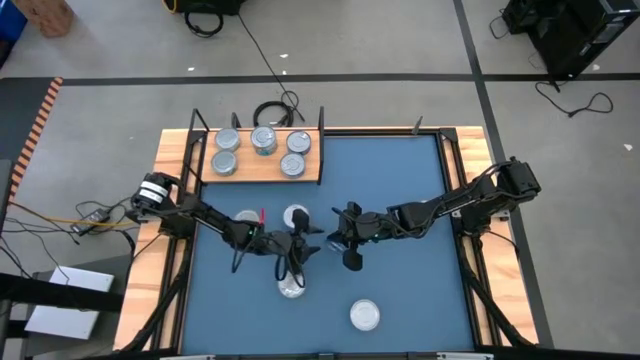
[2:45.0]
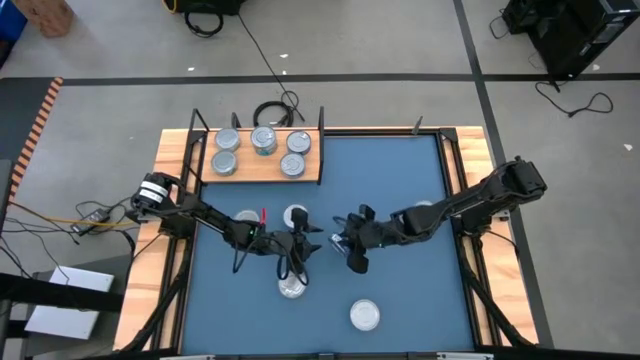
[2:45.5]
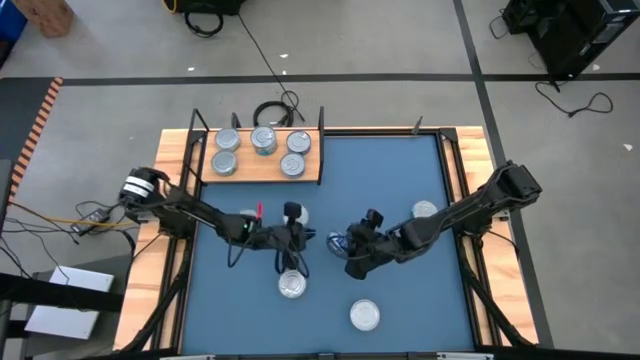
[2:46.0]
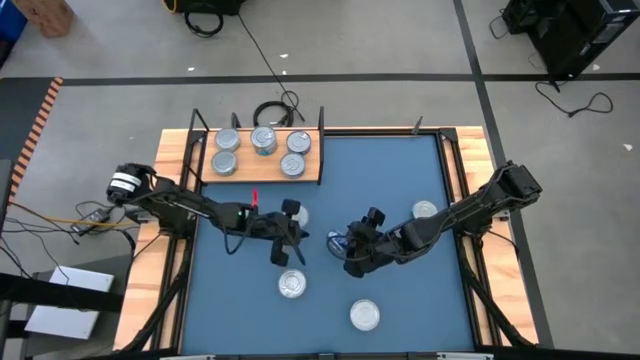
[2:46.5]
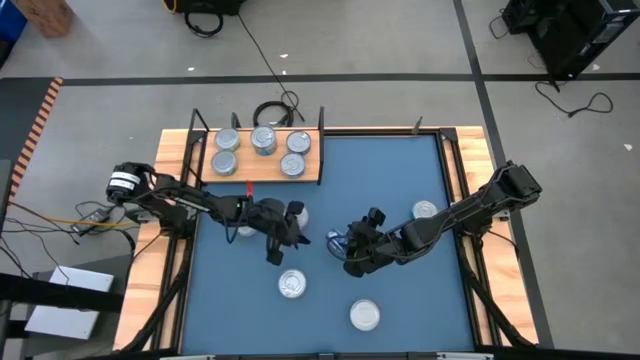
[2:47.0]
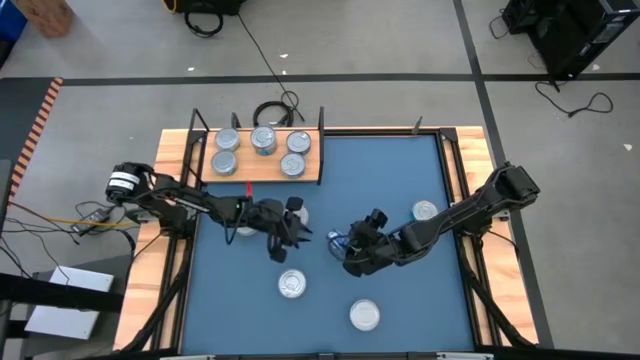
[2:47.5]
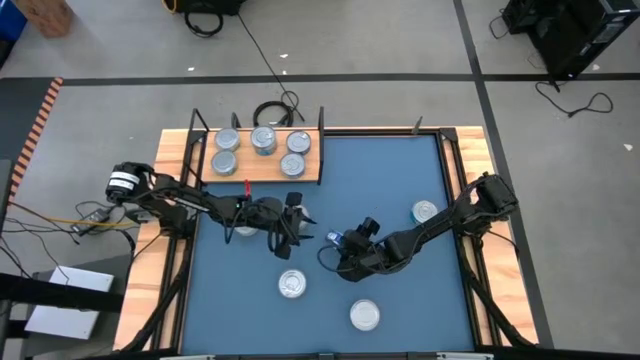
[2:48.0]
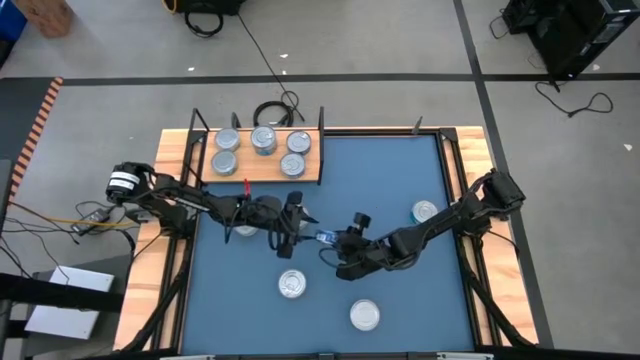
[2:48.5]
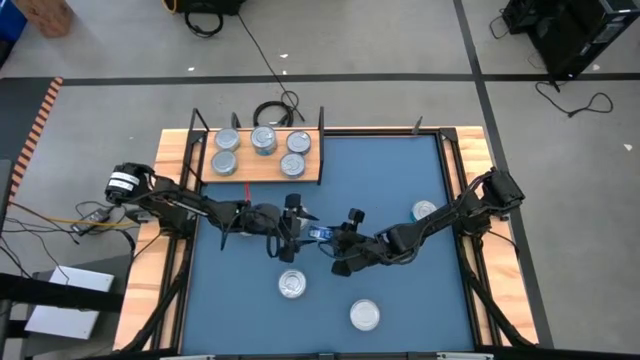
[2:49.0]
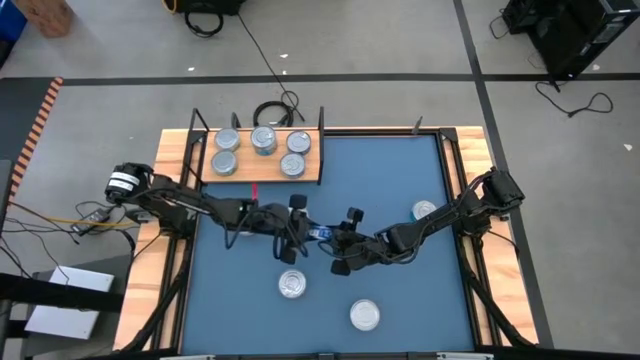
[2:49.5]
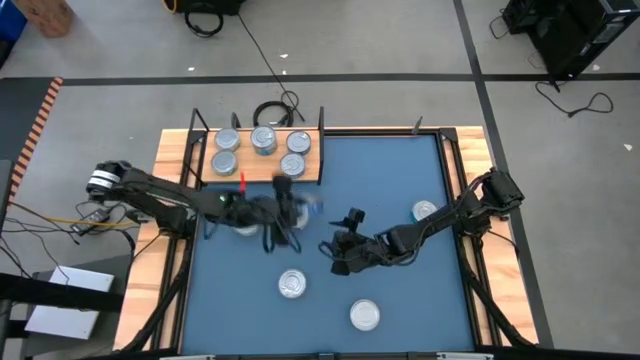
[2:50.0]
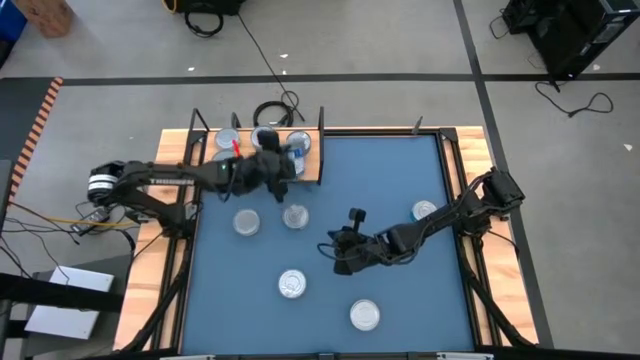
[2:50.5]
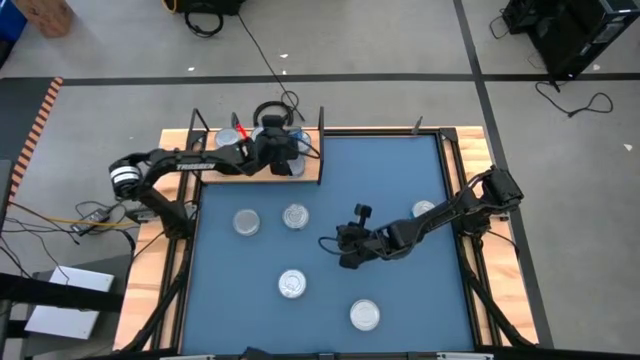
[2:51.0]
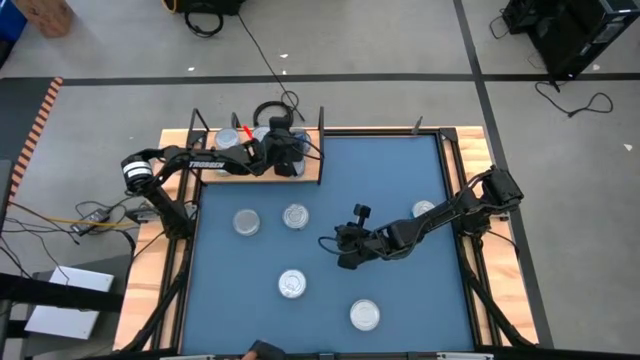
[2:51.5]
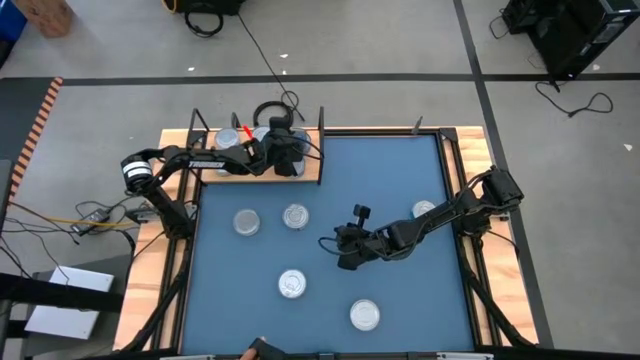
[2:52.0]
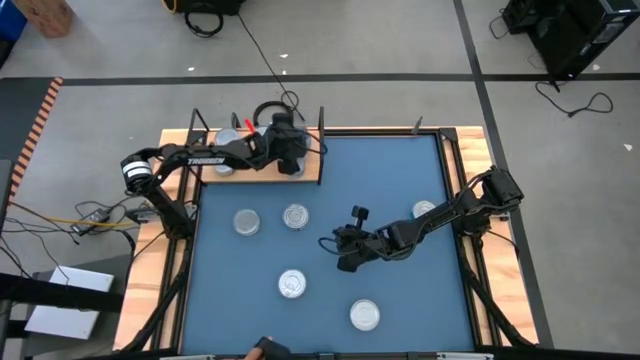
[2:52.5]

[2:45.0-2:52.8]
Task: Stack canned seafood by type on shelf
Stack the blue tuna can on top of the other blue tuna can on the shelf

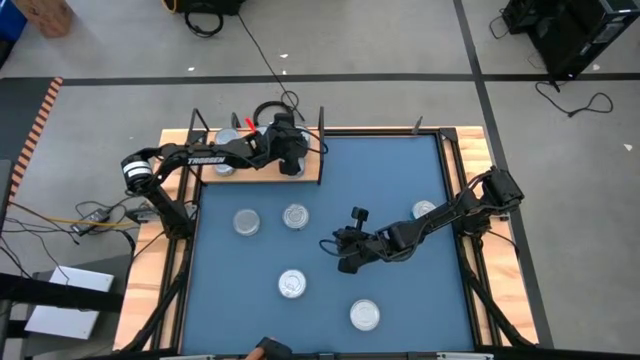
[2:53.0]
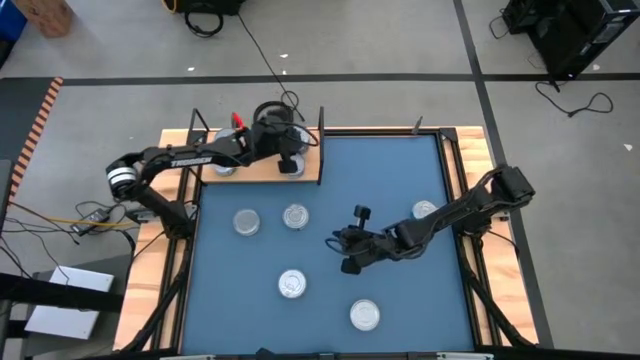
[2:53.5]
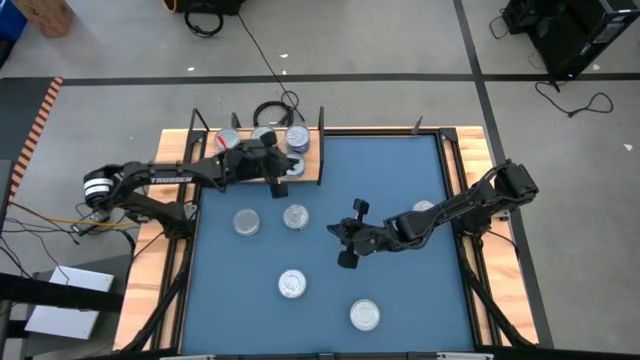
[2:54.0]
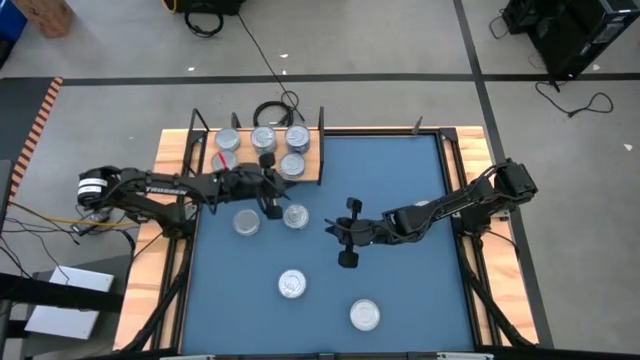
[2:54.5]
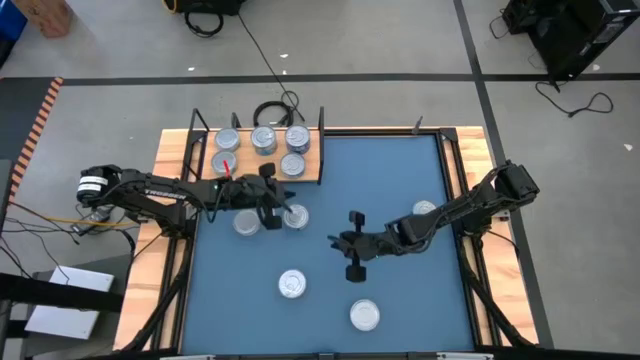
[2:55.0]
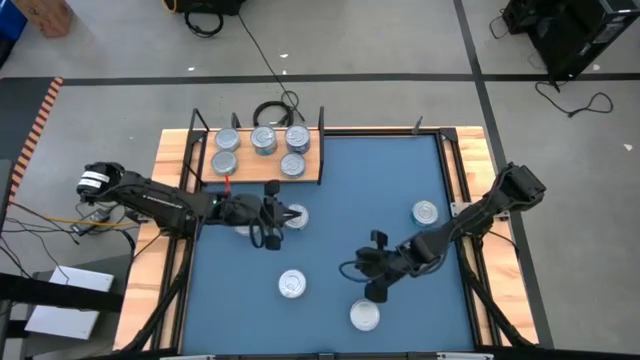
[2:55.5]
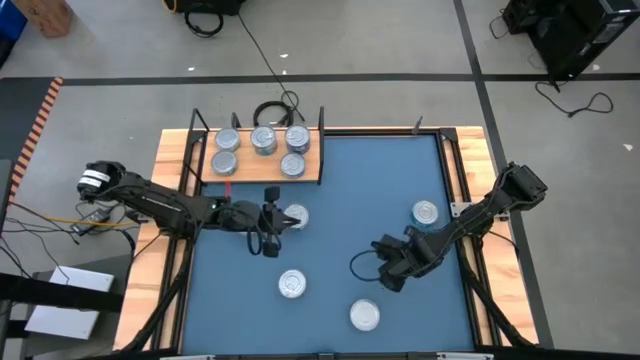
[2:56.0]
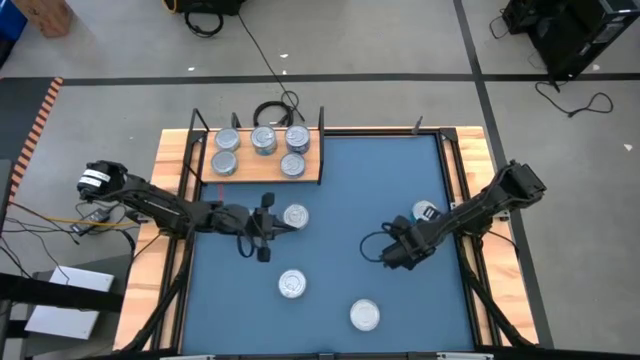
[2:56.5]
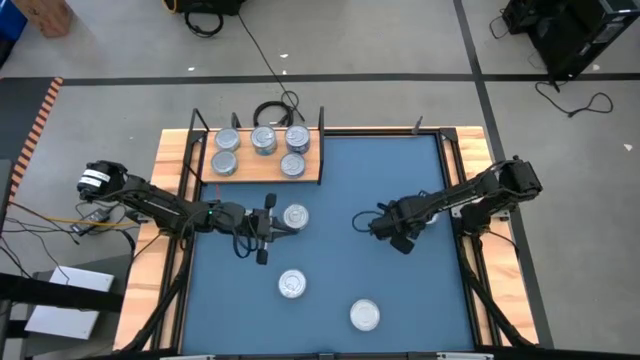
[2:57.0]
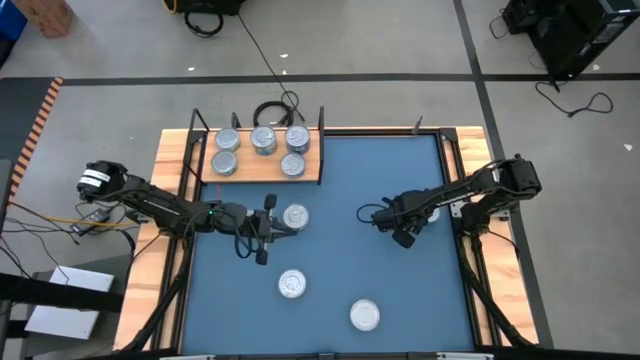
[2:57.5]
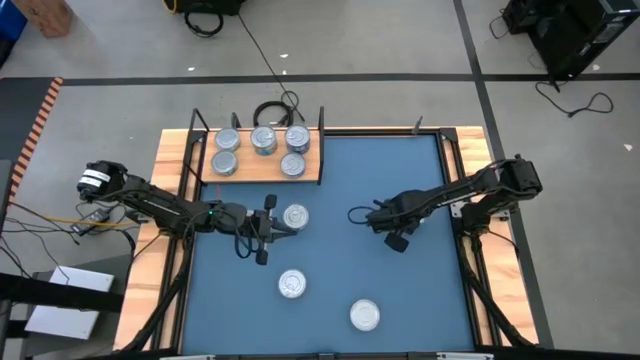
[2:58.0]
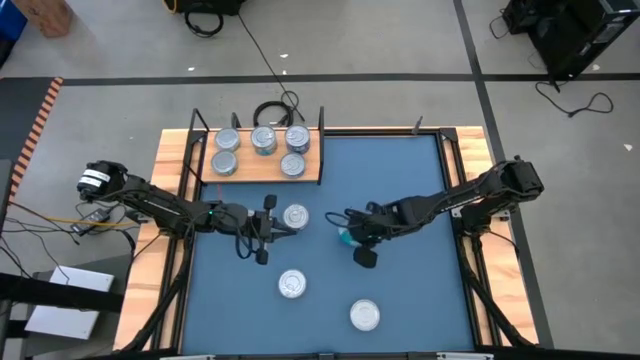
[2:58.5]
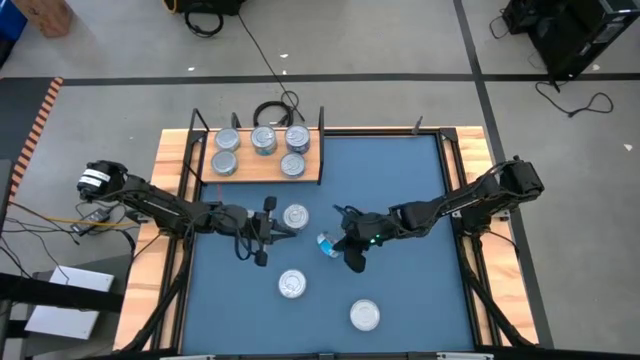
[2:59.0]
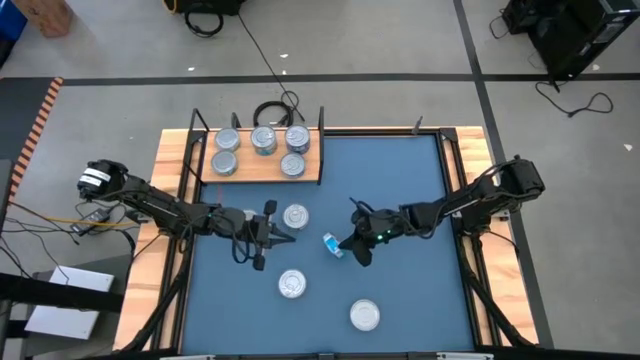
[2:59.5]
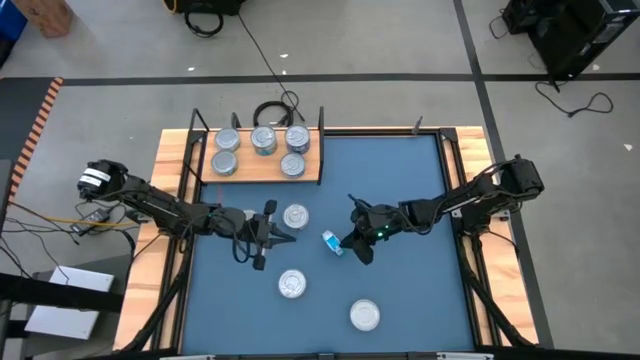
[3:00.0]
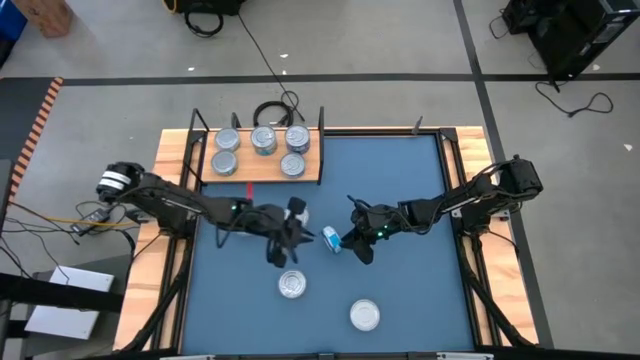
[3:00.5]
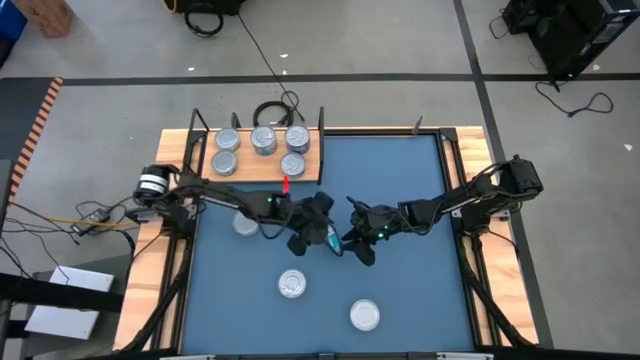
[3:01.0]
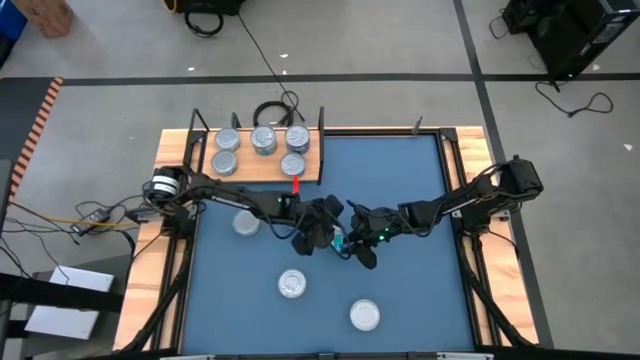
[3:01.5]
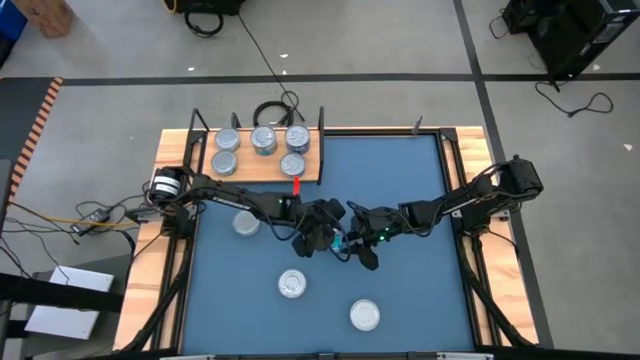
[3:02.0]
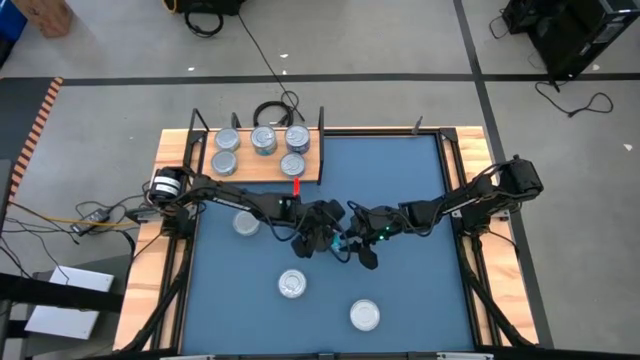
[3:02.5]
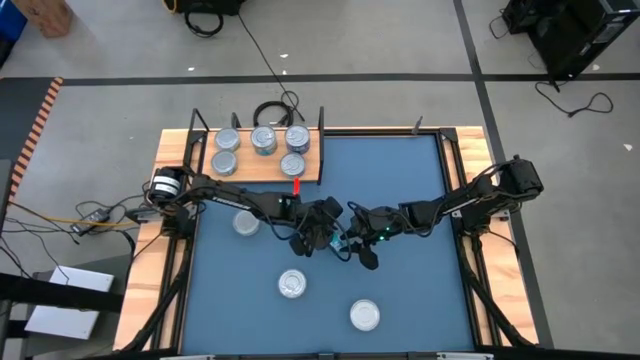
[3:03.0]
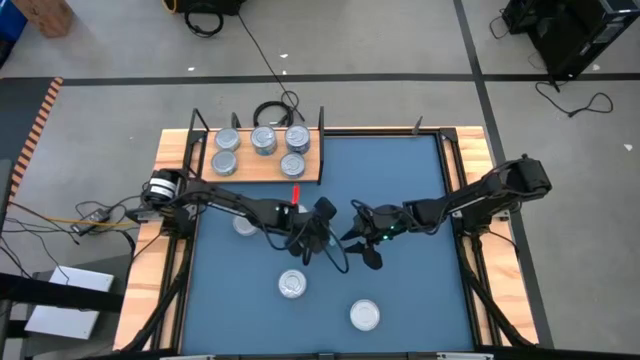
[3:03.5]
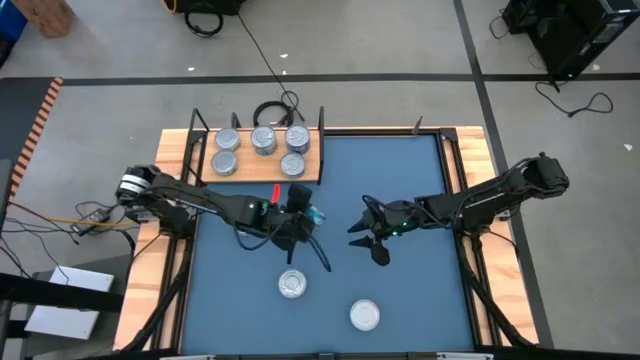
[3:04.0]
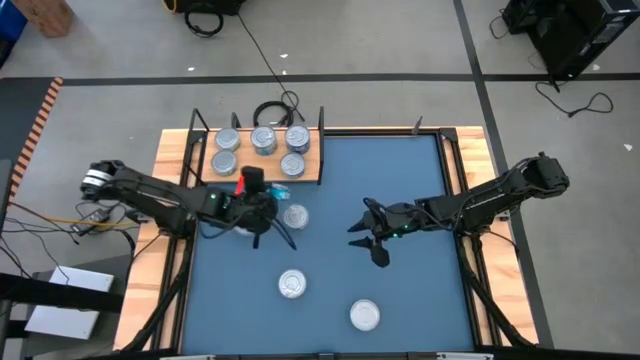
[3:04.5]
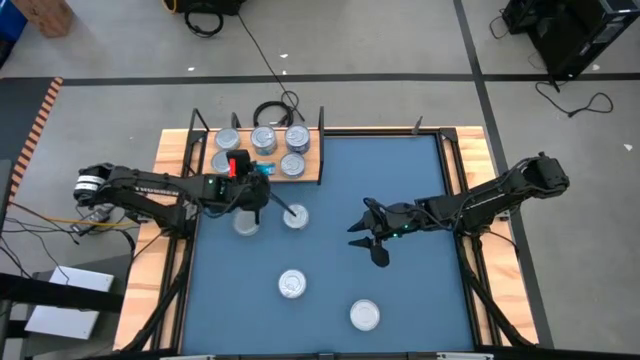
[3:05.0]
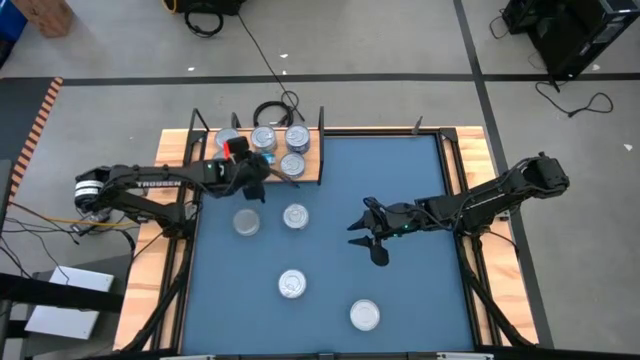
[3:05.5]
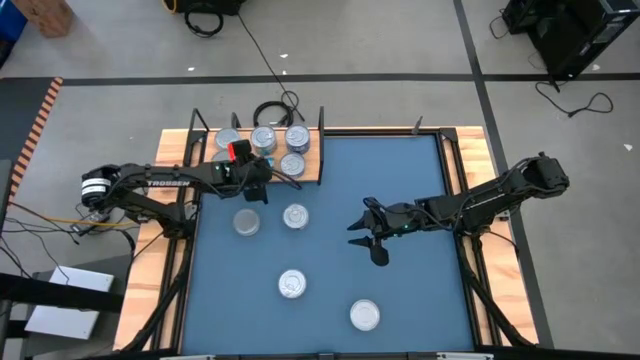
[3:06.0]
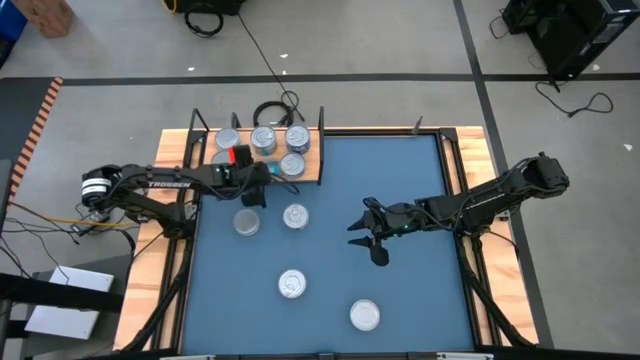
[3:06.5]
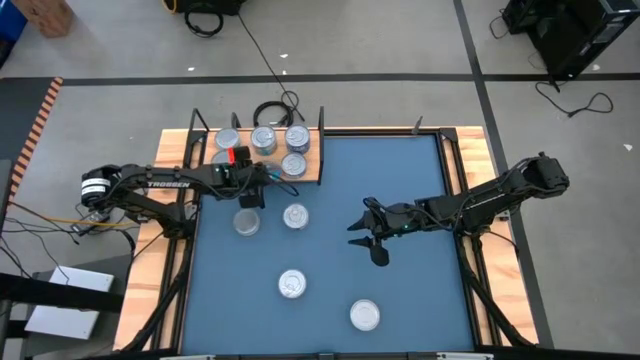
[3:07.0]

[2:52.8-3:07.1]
Put the yellow blue tuna can on the shelf
